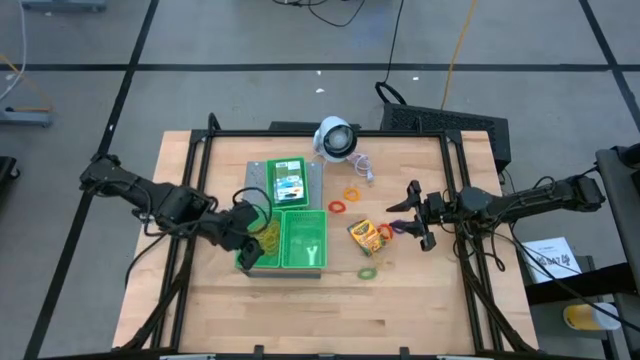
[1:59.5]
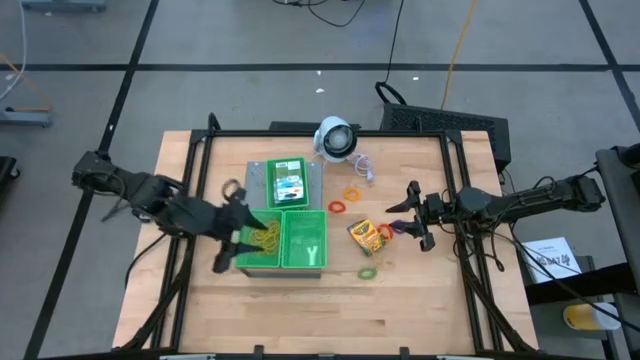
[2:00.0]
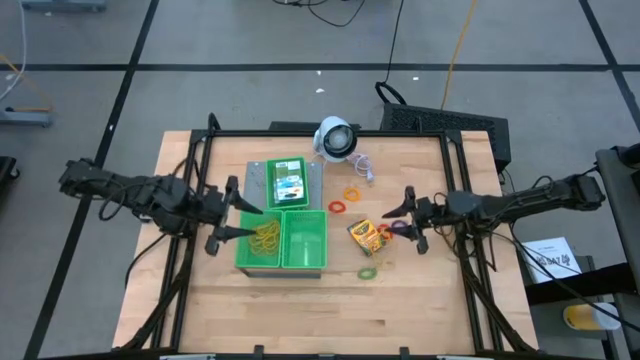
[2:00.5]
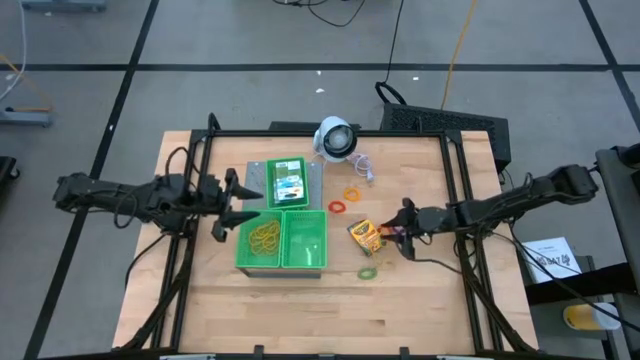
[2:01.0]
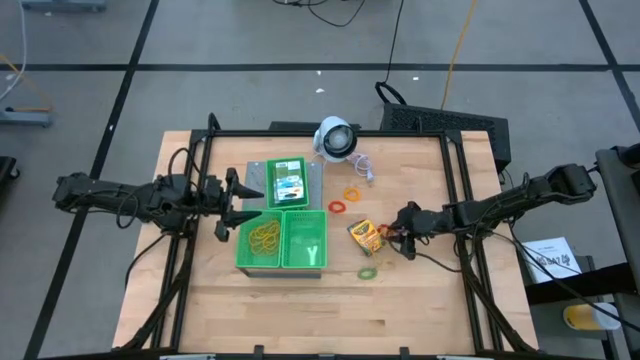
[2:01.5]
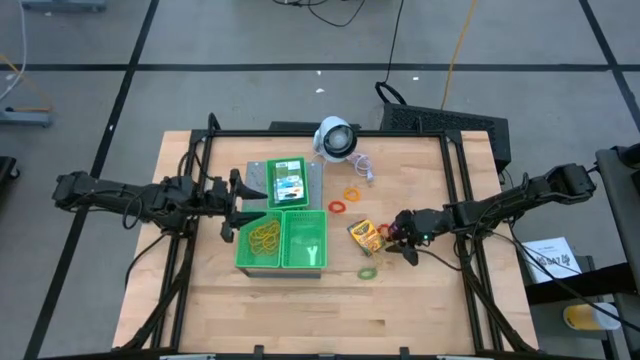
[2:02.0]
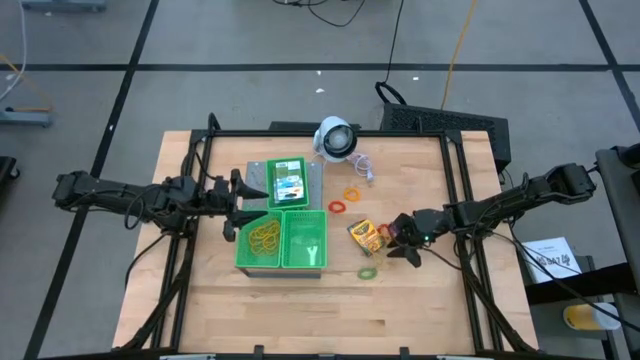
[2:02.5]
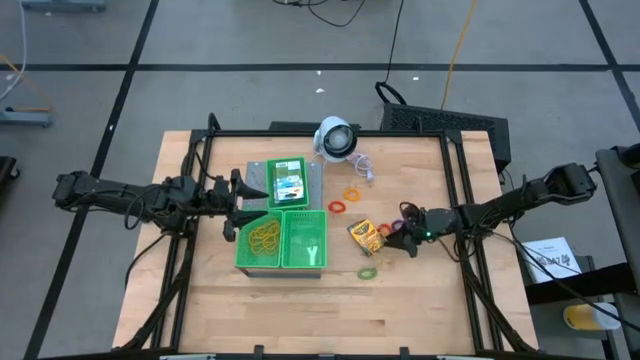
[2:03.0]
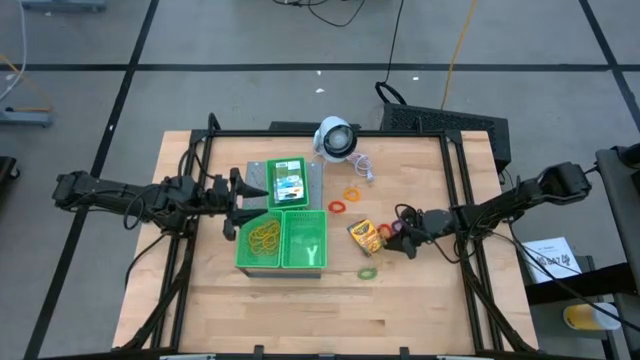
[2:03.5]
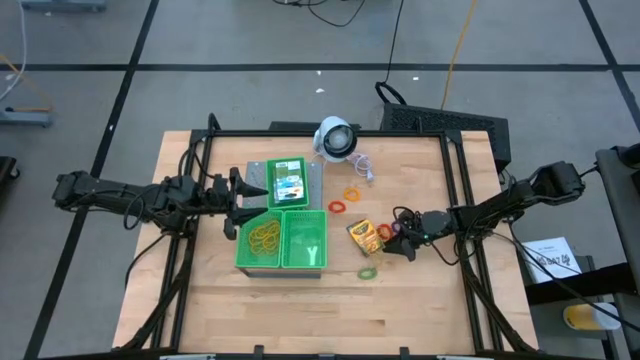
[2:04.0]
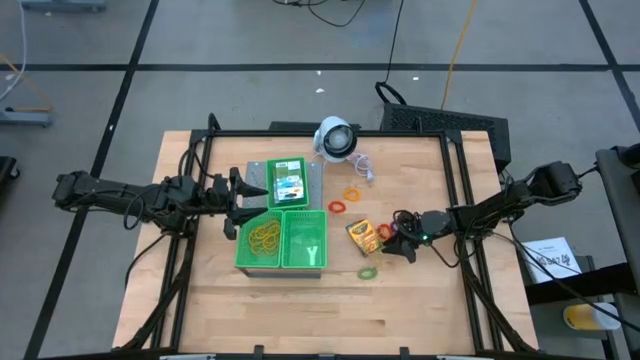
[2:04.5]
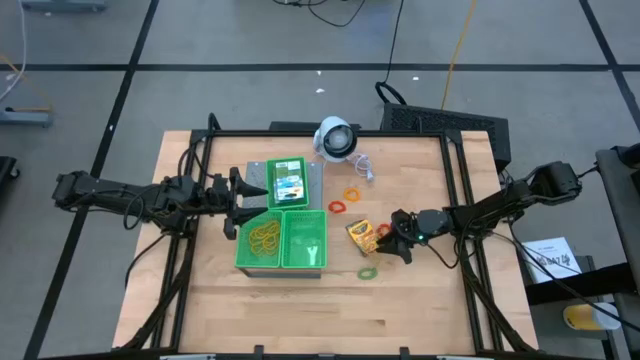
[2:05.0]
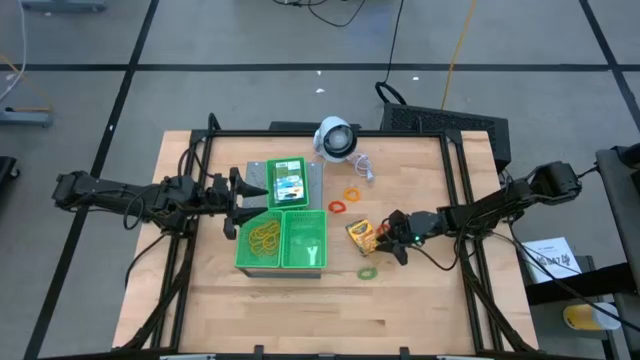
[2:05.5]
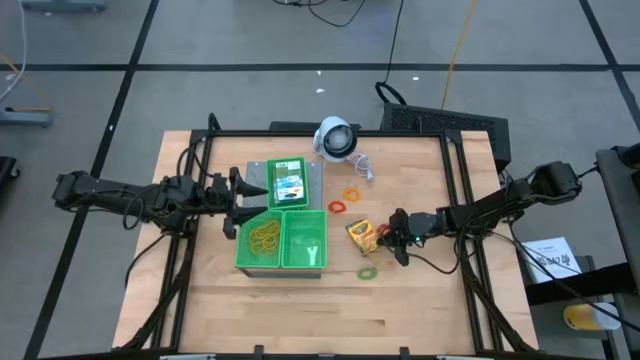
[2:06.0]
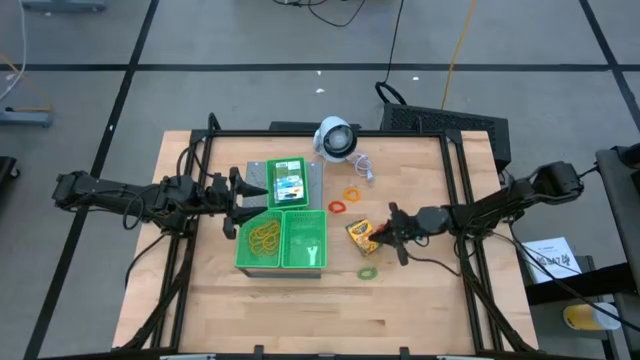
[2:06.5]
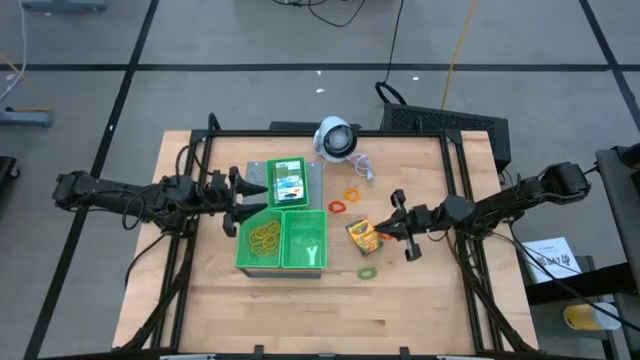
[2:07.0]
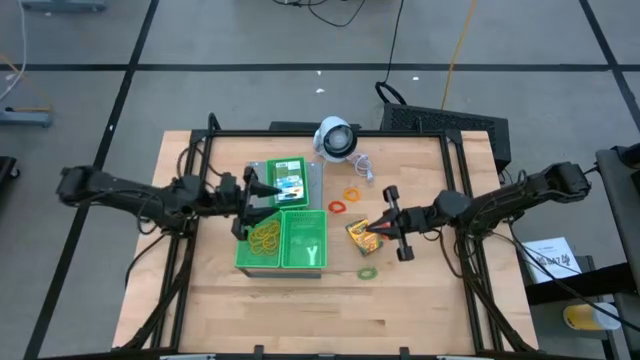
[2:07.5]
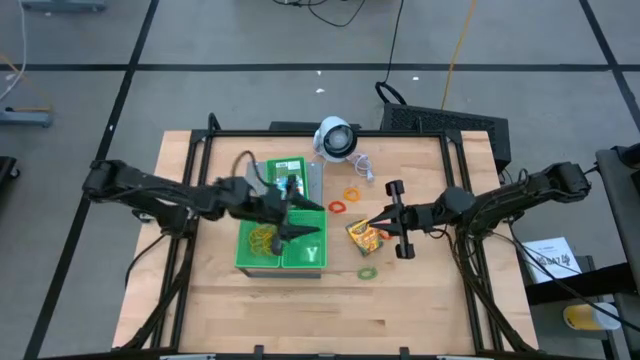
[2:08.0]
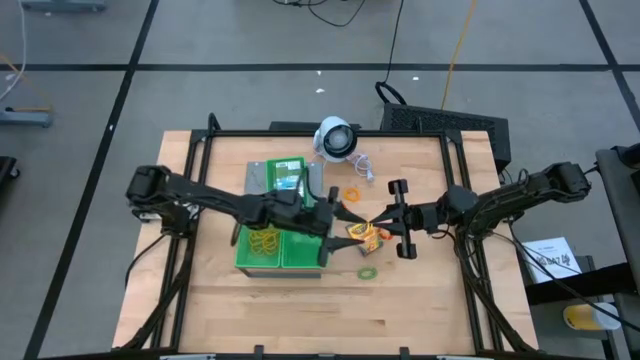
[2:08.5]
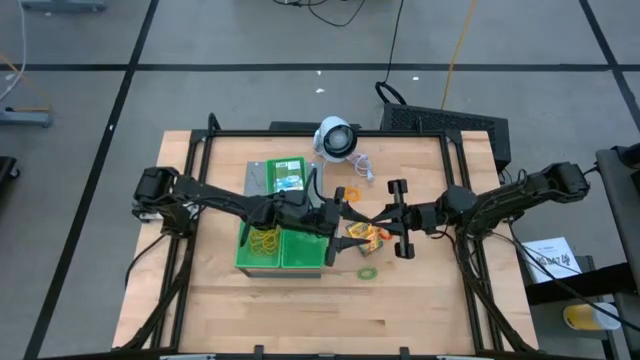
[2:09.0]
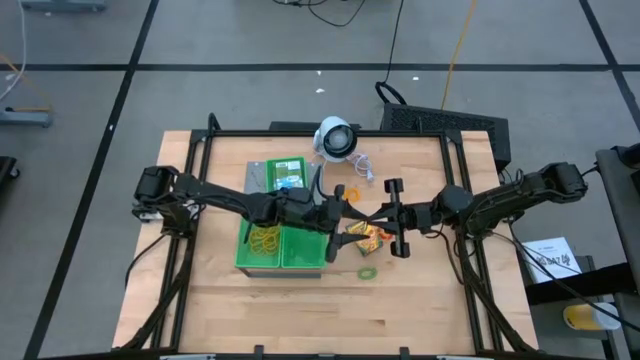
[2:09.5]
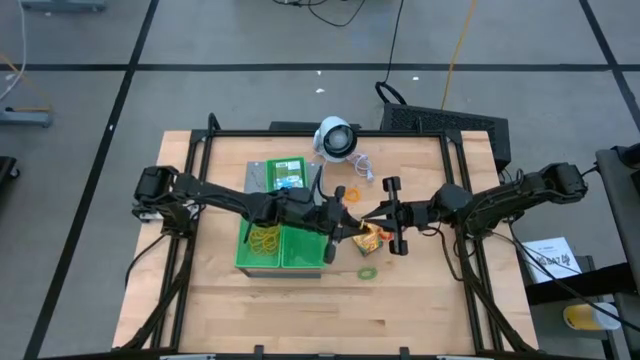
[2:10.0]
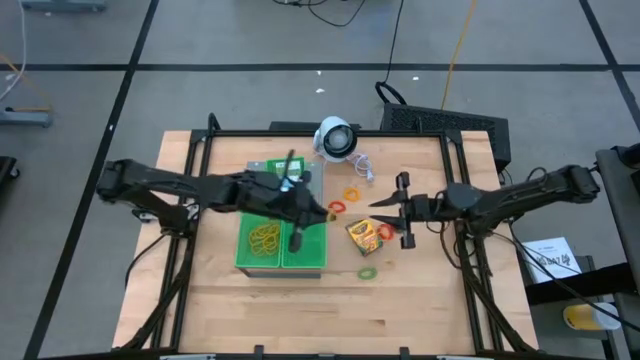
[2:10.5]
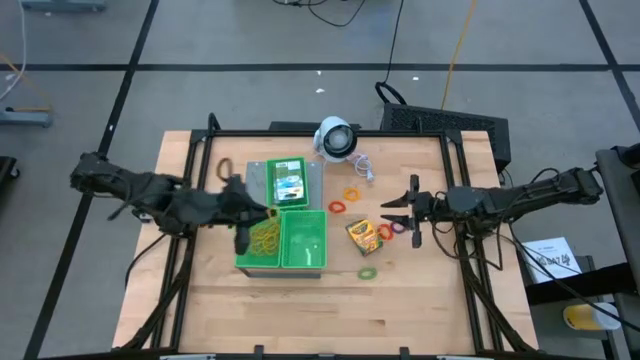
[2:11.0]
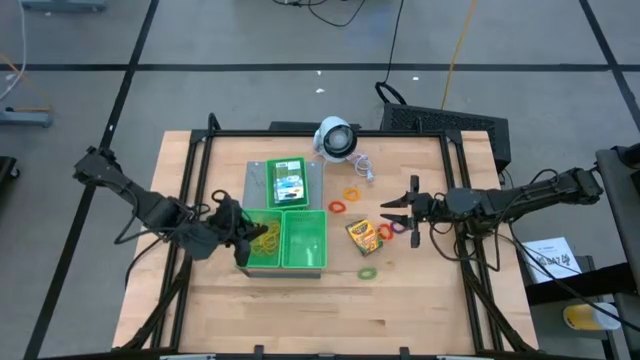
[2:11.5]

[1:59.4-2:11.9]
Task: Pick & Place Office Desk Supplies
Put the yellow rubber band into the bottom left green basket on the shelf

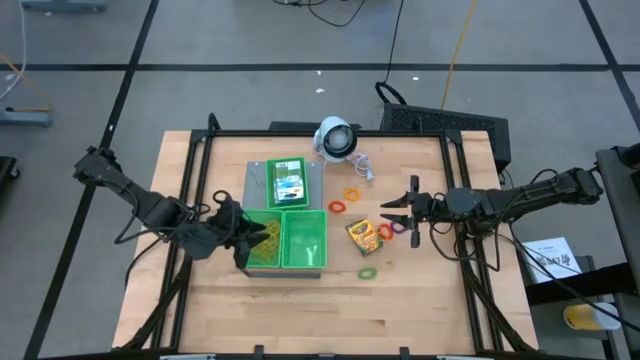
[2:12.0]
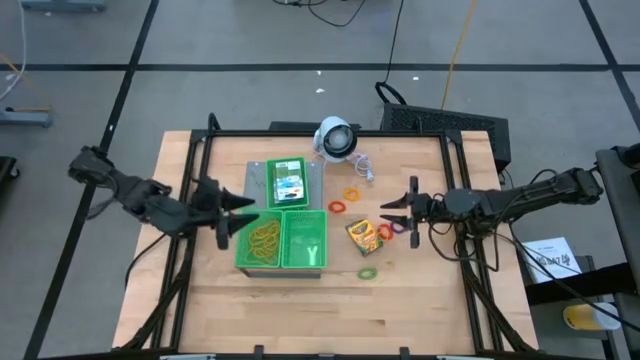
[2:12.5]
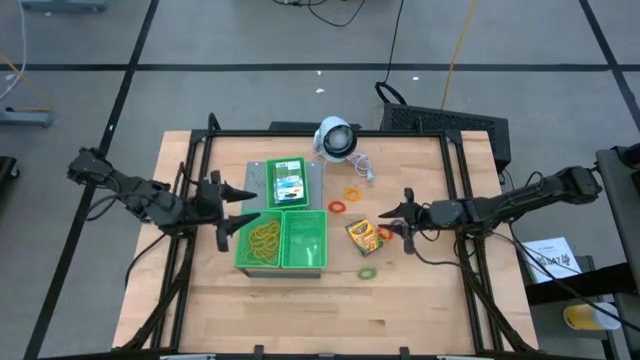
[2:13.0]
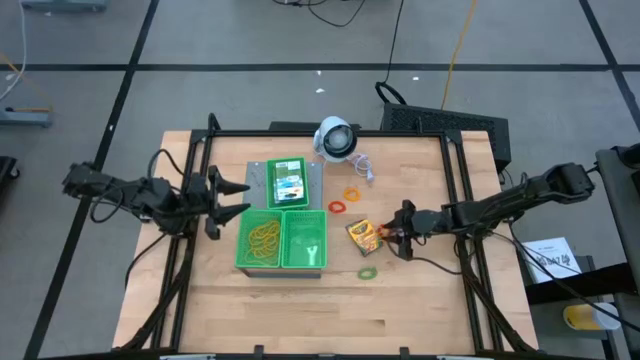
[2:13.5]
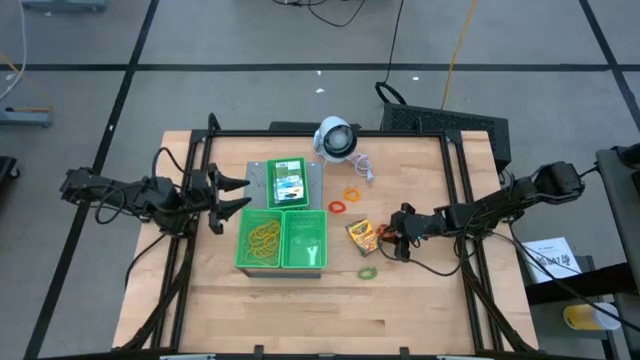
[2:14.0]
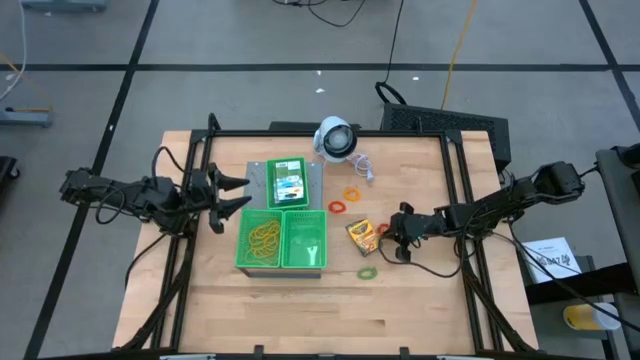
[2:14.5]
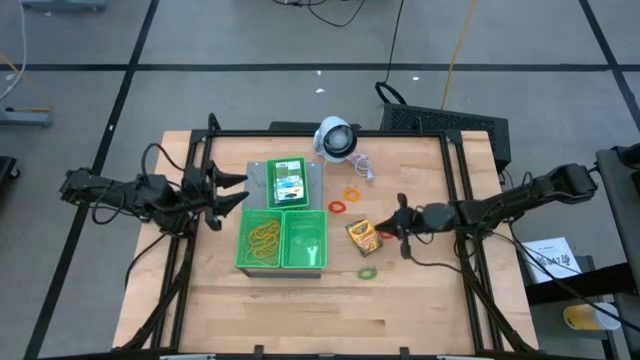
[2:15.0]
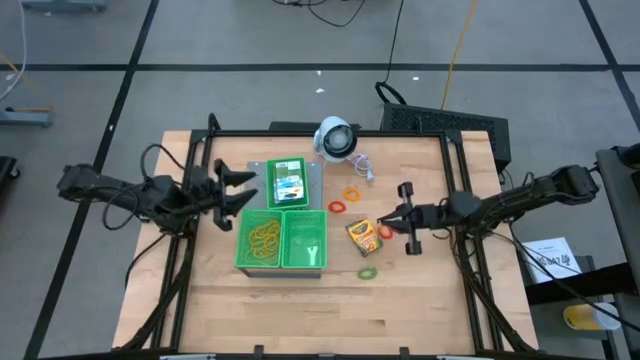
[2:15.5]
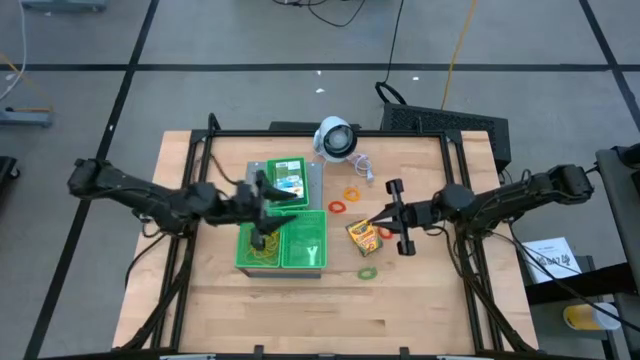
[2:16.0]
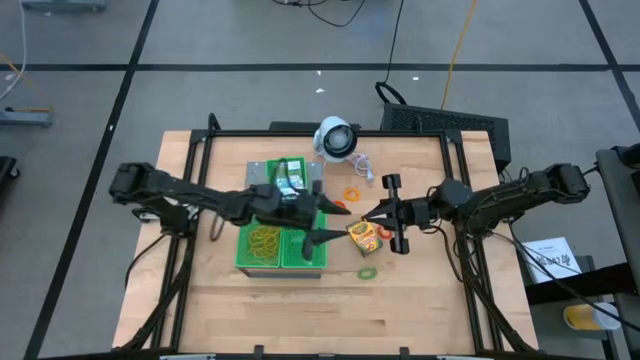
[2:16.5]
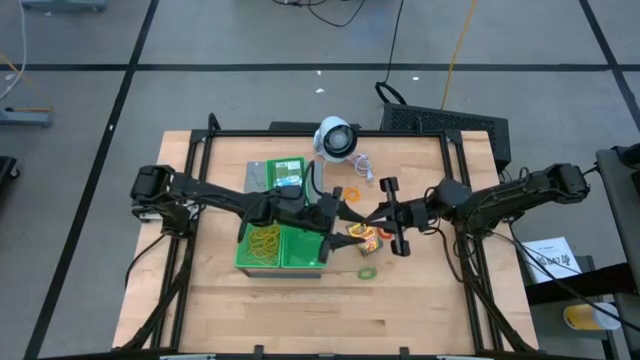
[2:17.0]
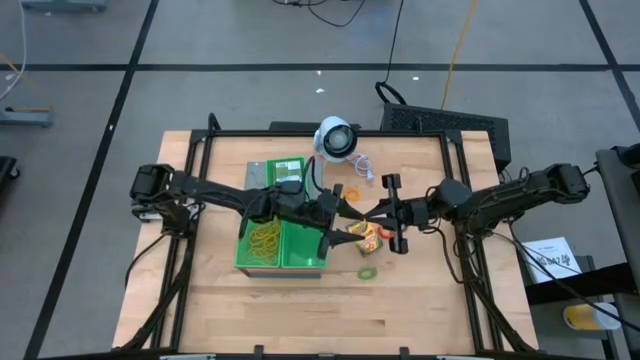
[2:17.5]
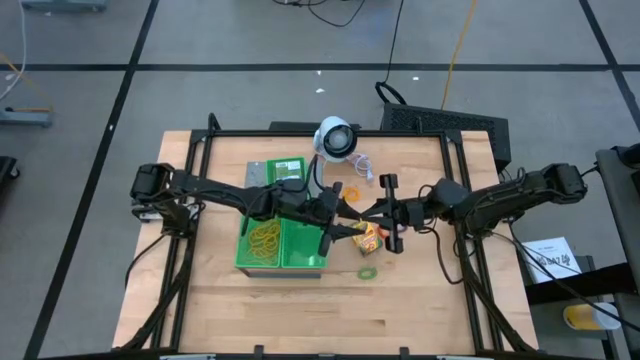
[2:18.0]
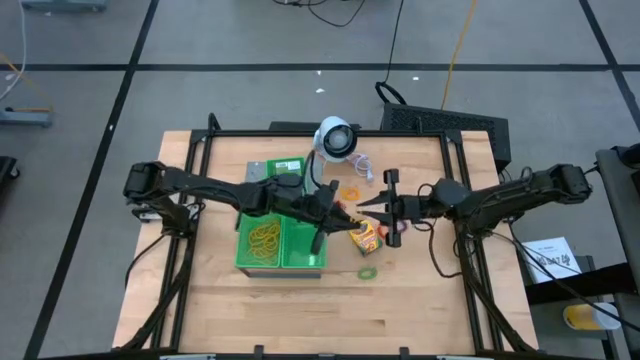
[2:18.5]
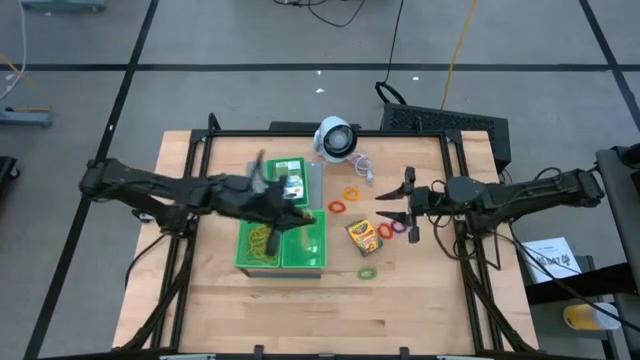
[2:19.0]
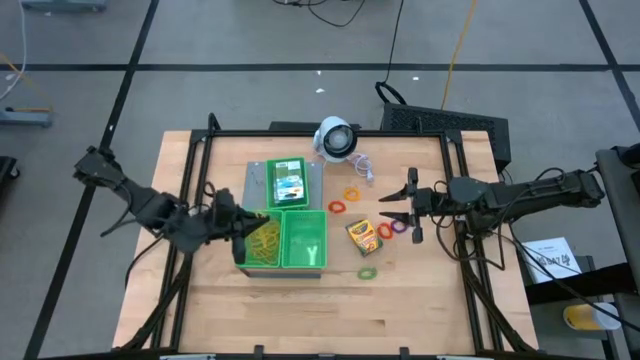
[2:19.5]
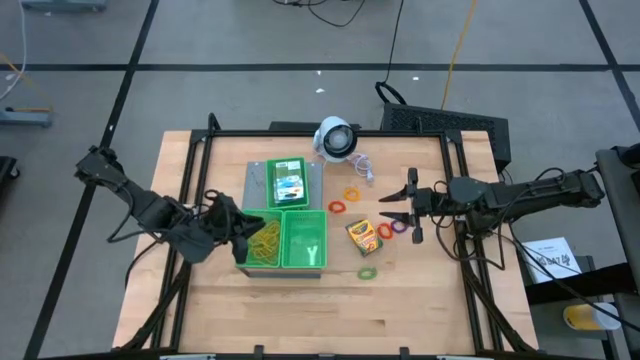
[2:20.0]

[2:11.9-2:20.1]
Put the yellow rubber band into the bottom left green basket on the shelf

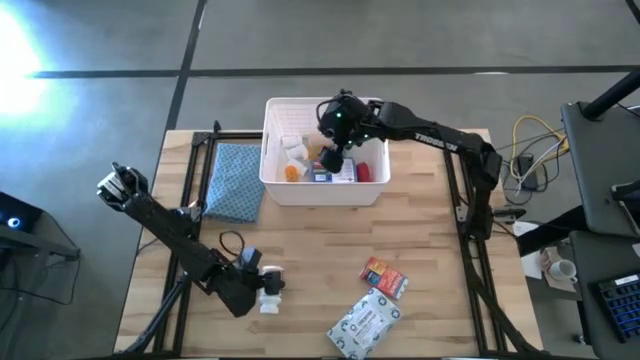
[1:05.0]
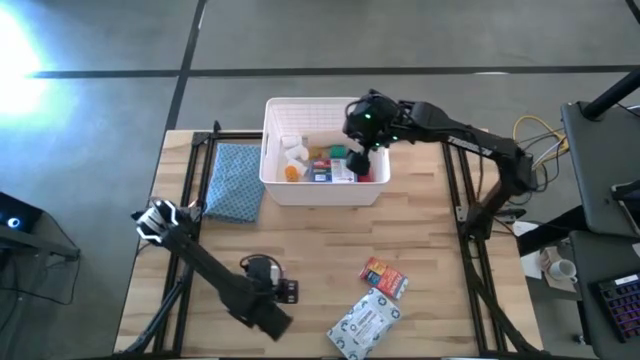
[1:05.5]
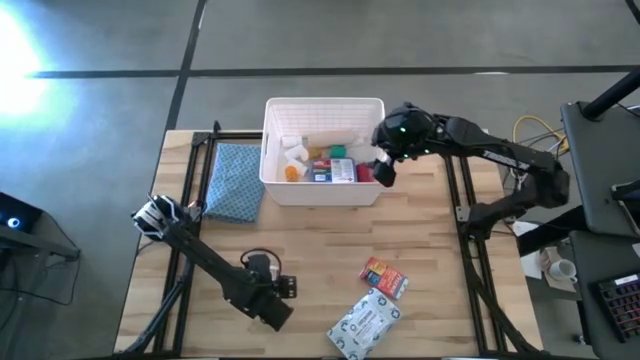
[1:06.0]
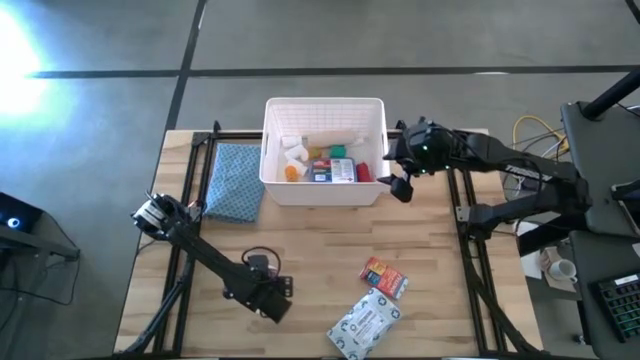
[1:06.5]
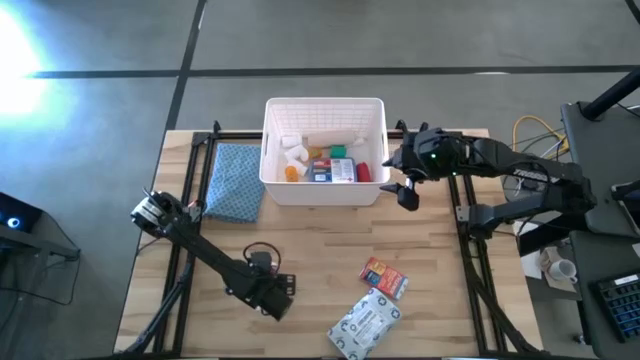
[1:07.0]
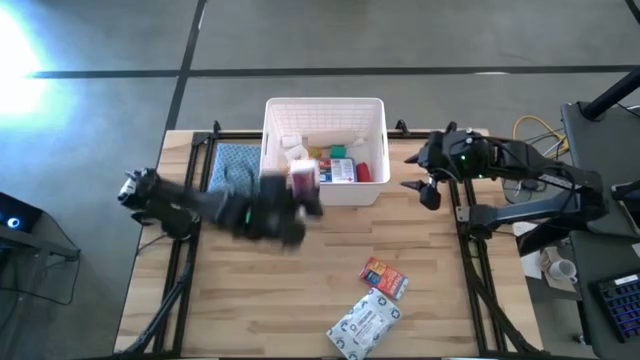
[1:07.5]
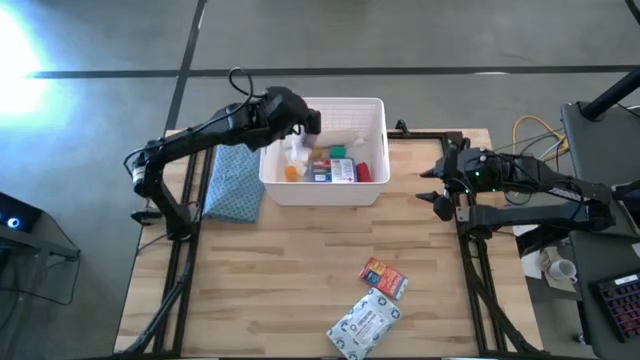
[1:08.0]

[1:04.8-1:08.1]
Task: Pick & place medical supplies in basket/bin
Put the violet pill bottle into the white bin
